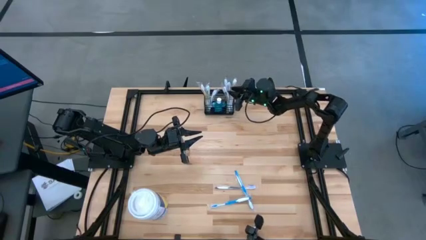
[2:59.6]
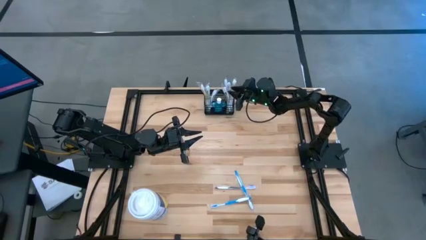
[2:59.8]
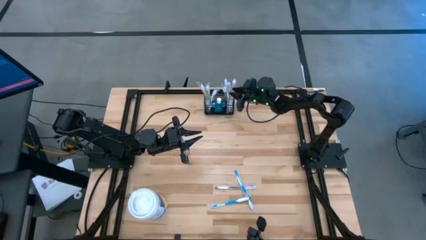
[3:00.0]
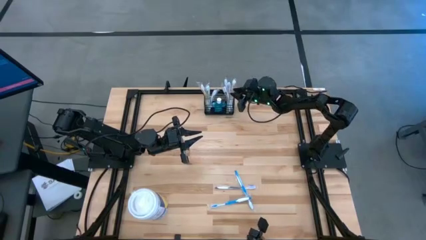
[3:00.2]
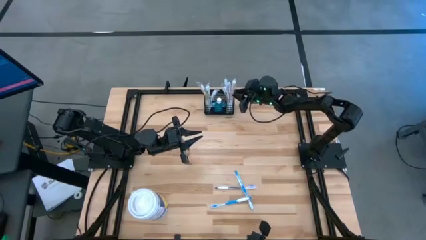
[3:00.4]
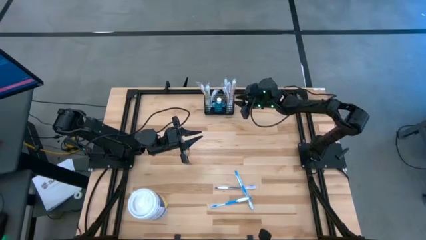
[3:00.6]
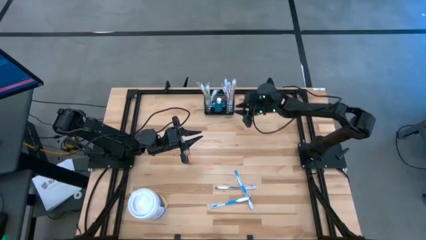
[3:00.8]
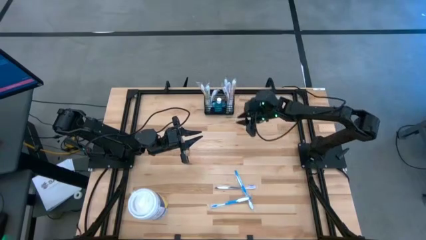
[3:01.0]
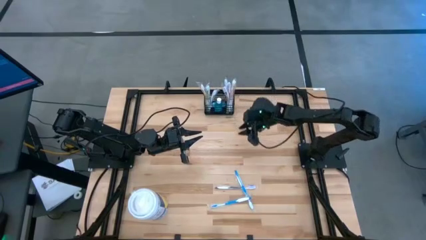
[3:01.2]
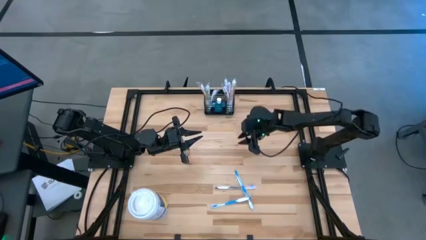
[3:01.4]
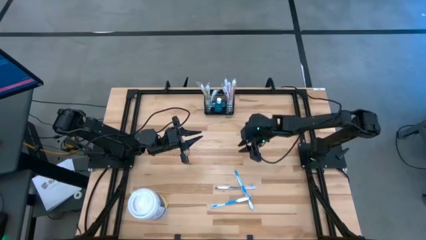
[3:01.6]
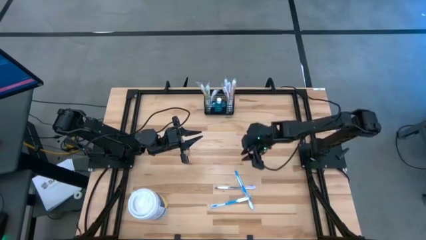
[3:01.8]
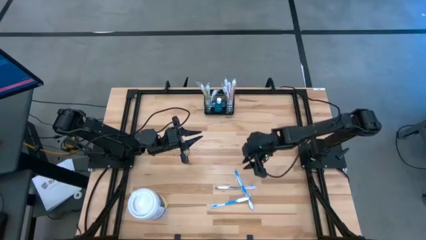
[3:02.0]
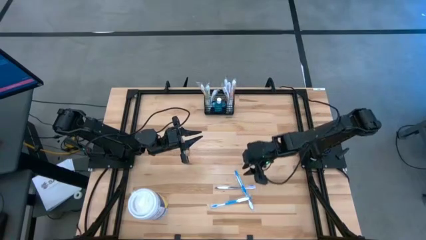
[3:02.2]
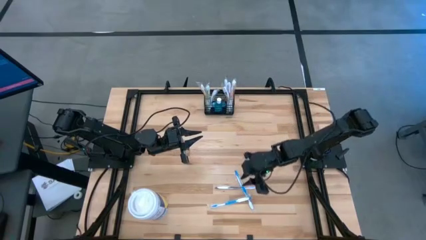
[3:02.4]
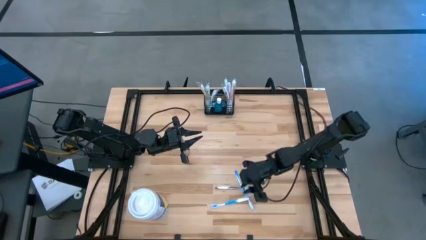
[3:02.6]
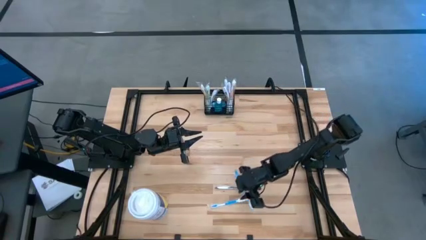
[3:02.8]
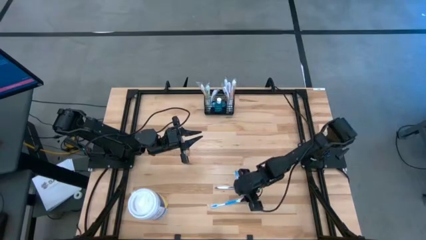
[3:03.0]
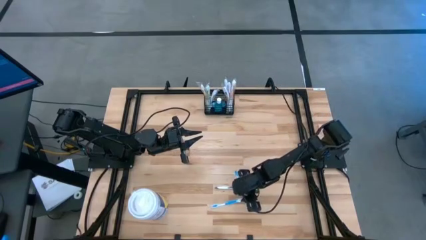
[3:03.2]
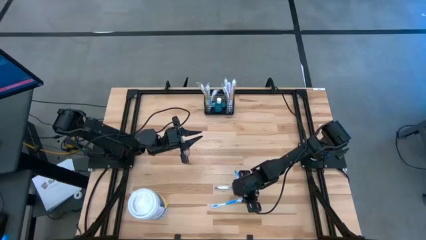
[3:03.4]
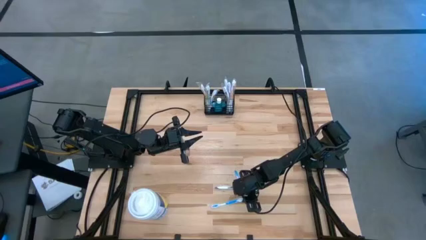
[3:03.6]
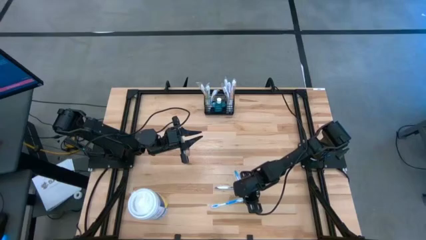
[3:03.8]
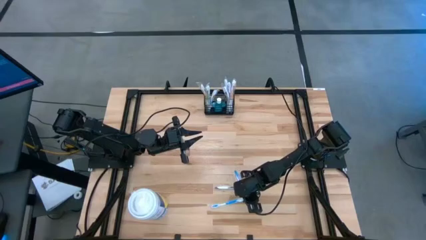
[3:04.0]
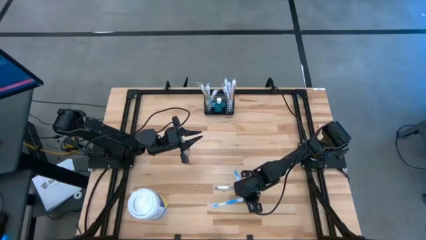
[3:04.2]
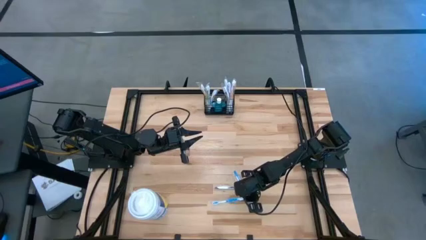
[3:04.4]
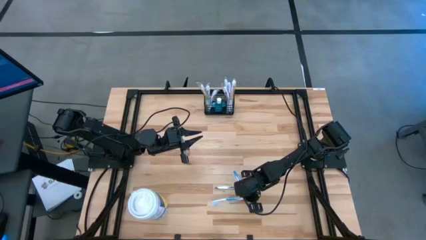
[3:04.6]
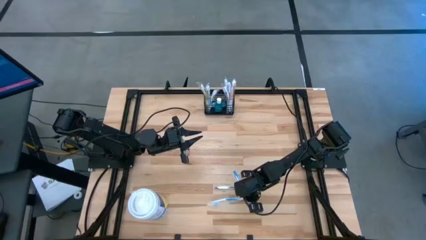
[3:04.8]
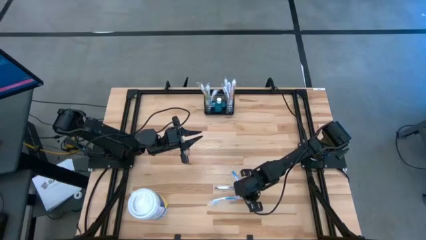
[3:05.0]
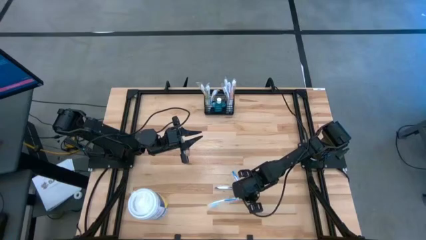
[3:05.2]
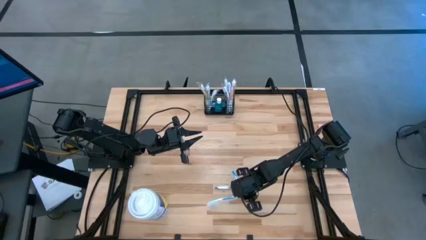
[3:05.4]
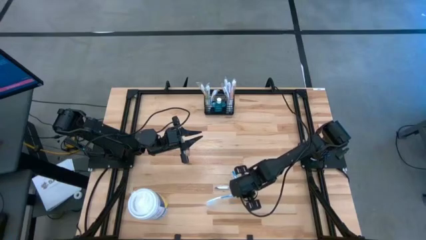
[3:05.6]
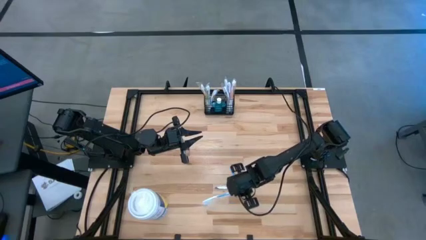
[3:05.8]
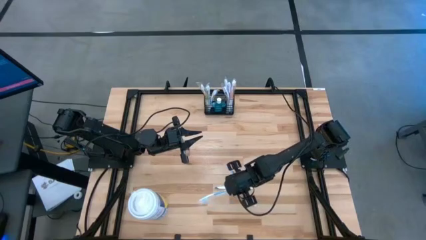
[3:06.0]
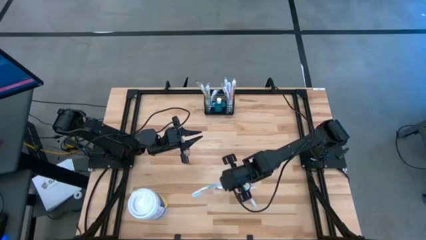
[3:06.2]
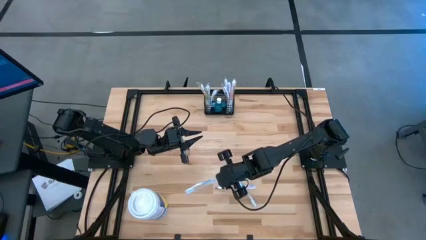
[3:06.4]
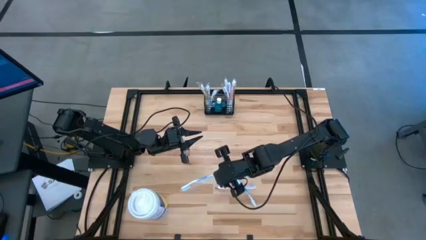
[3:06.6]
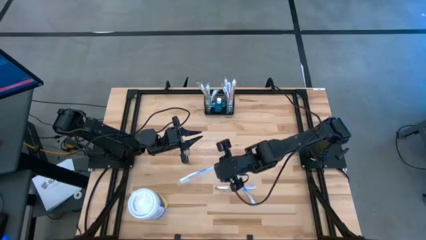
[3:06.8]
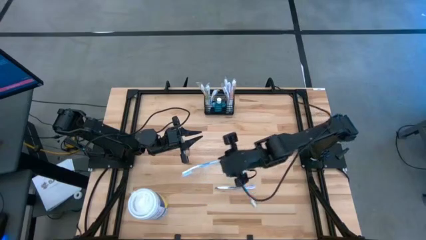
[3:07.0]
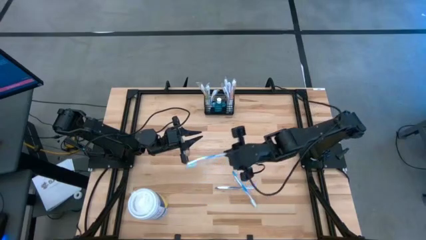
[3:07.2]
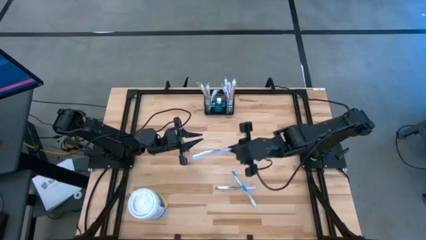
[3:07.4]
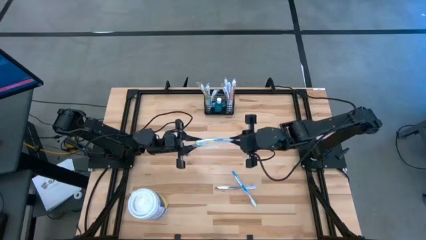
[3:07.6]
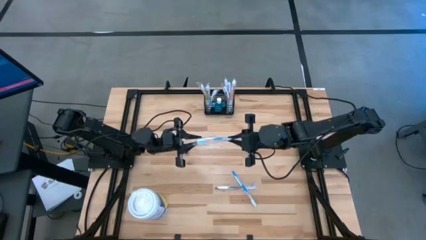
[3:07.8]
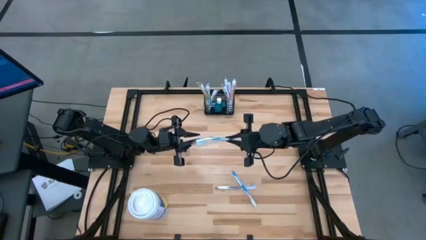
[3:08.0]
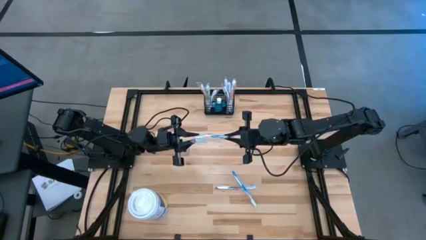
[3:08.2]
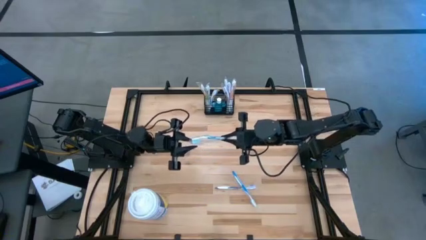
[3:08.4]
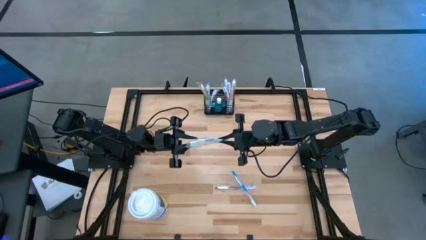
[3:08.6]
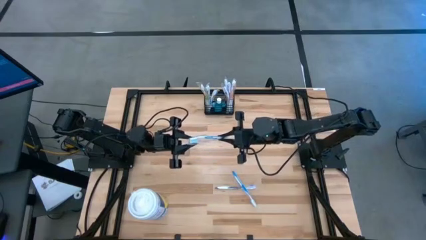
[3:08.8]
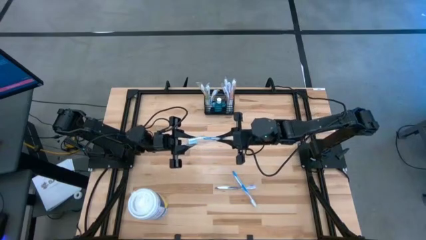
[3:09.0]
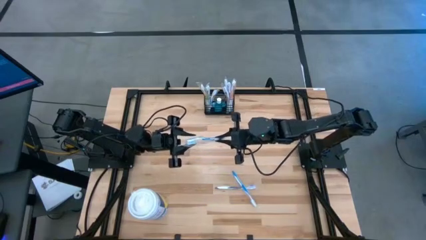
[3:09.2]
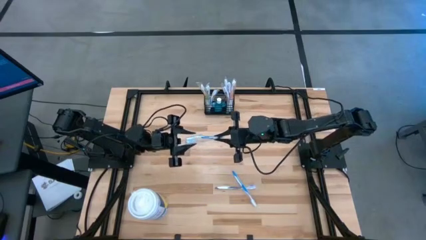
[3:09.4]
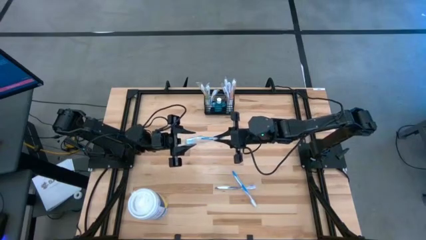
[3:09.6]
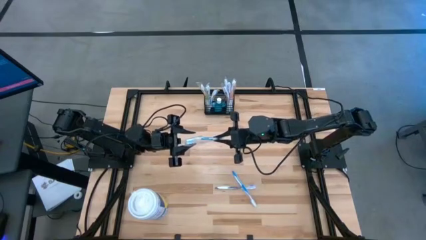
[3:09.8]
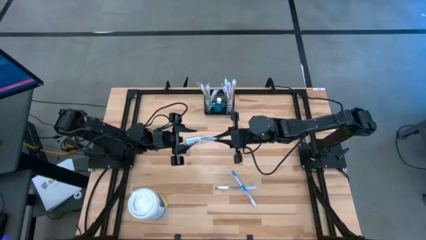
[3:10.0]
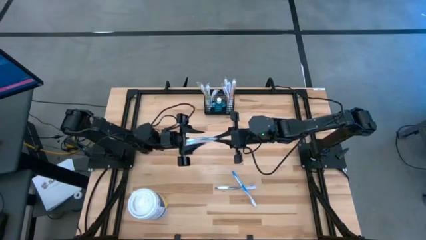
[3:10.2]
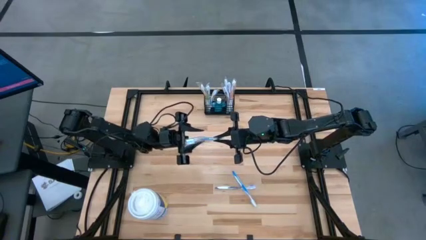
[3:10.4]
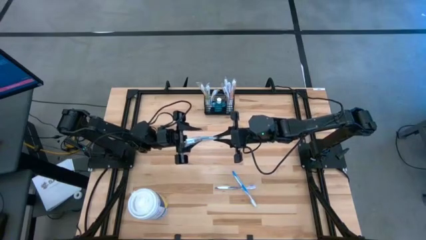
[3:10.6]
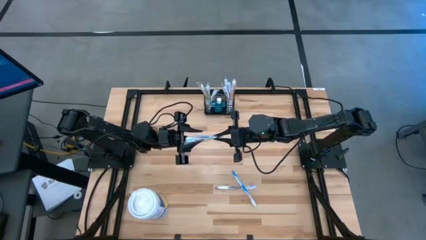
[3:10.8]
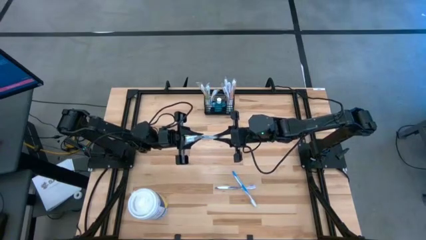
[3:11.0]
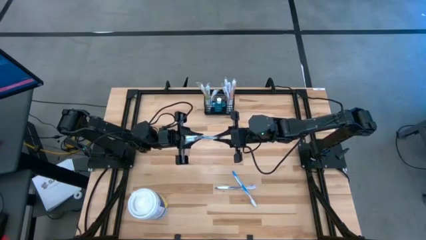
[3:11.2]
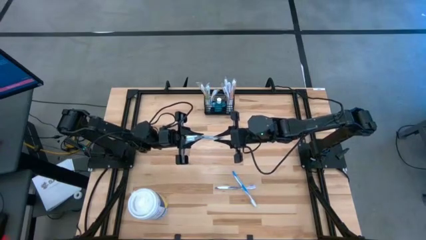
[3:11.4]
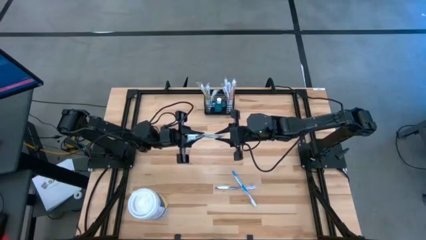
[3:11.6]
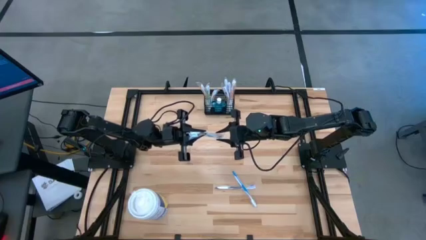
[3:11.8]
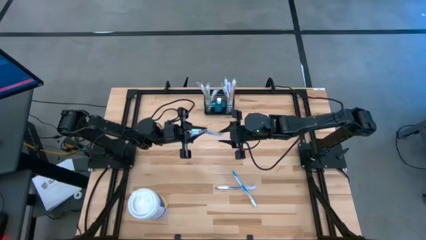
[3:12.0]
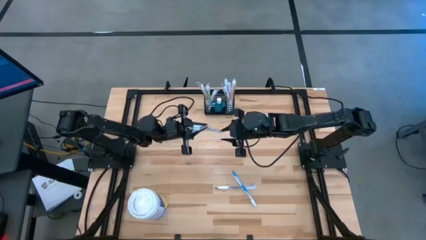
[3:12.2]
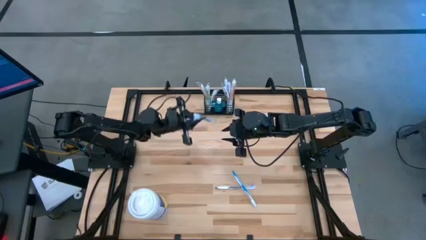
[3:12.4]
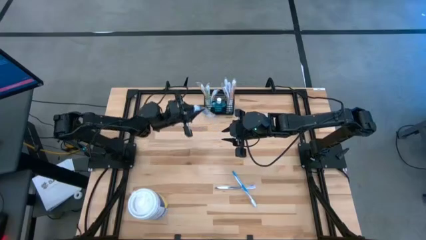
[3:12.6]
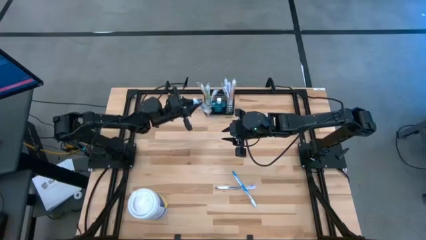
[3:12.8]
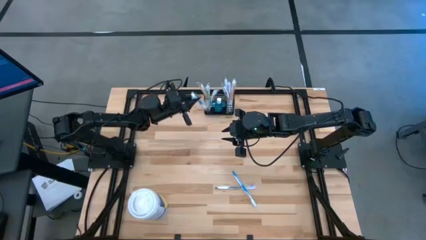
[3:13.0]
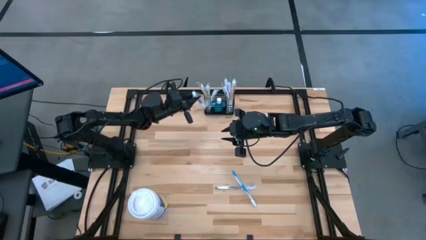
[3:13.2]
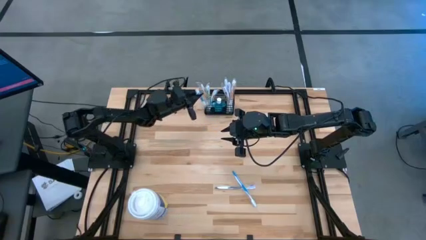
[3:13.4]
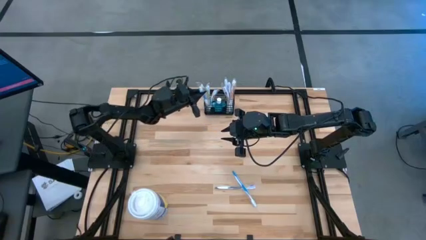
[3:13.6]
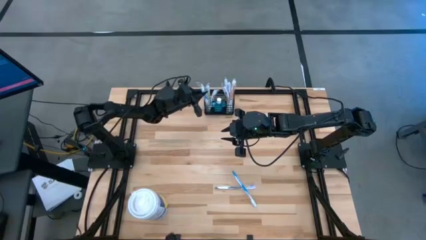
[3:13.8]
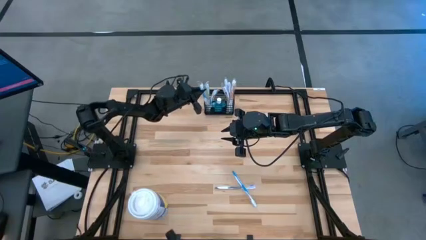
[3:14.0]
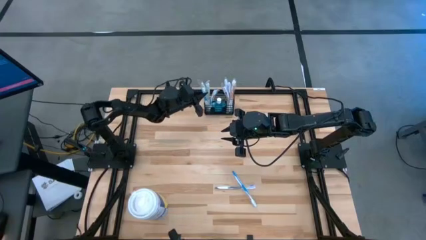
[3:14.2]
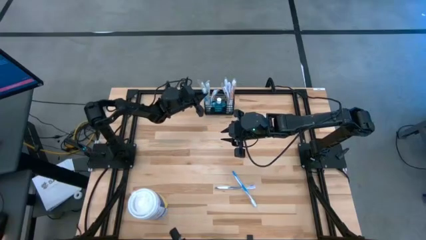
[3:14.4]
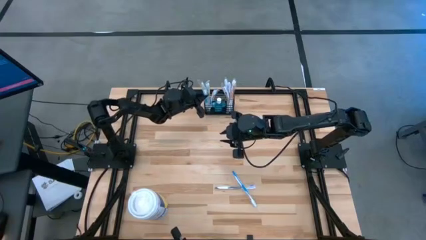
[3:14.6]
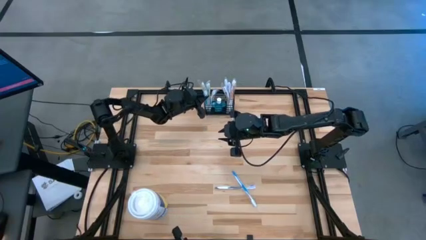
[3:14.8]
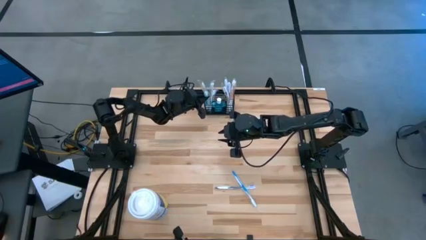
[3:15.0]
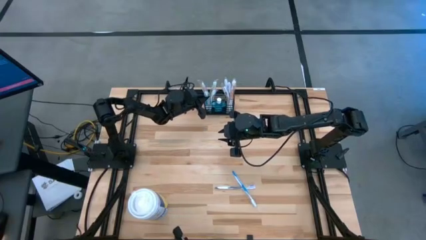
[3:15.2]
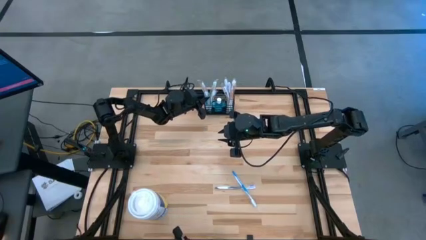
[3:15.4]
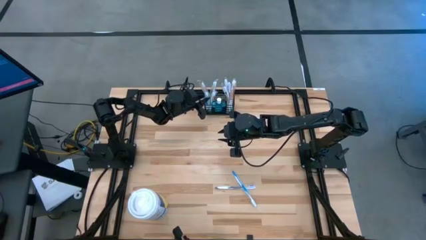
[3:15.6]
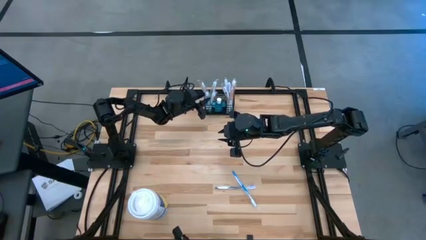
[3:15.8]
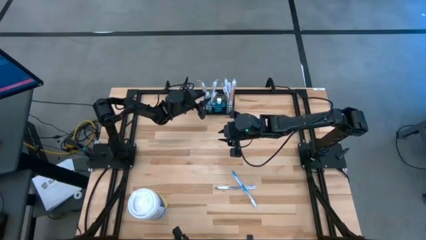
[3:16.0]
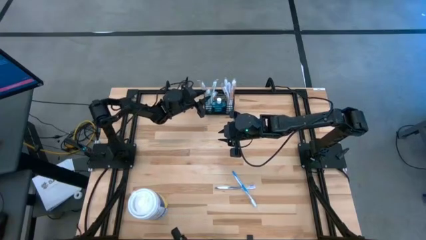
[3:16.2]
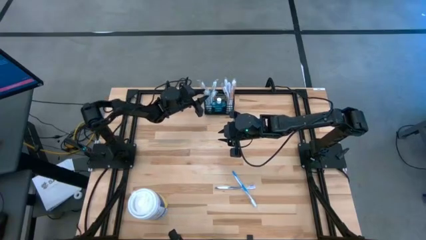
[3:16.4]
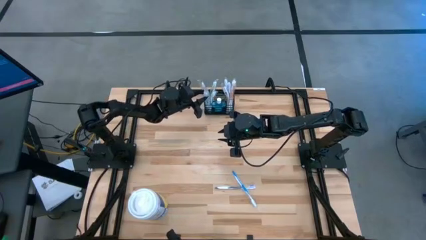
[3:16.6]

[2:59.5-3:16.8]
Task: Pick & Place toothbrushing station
Put the blue toothbrush into the mesh organizer
